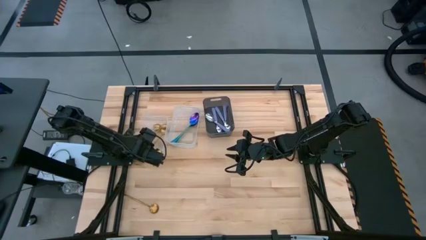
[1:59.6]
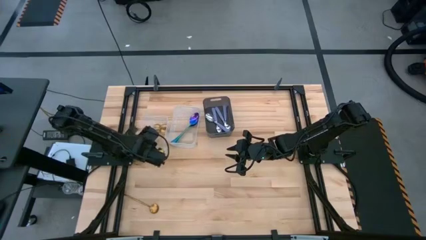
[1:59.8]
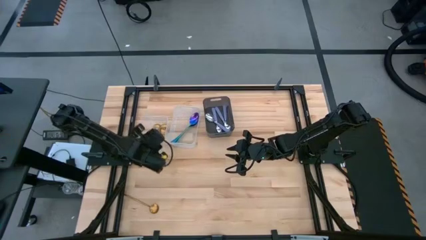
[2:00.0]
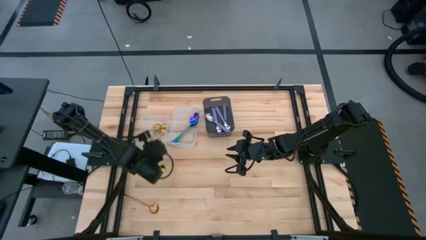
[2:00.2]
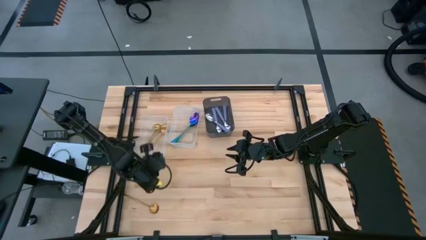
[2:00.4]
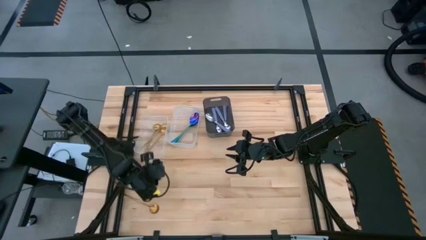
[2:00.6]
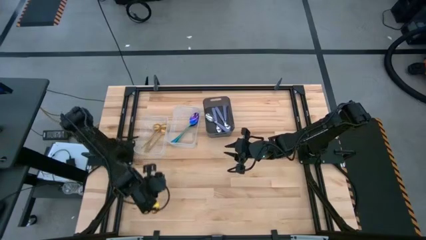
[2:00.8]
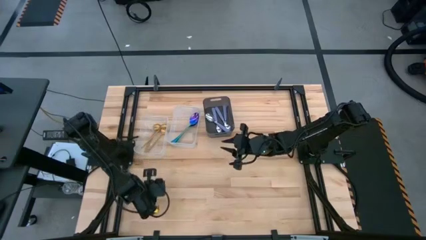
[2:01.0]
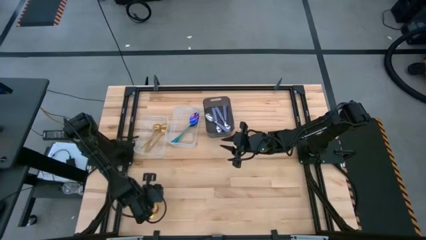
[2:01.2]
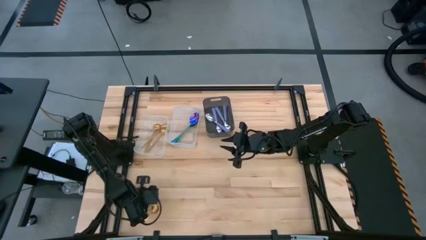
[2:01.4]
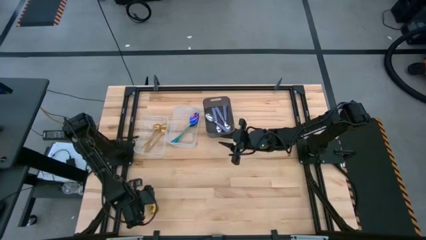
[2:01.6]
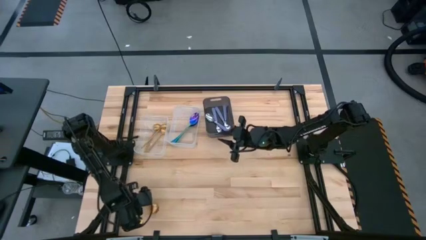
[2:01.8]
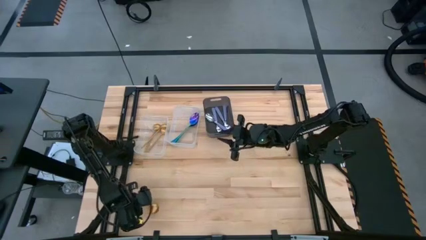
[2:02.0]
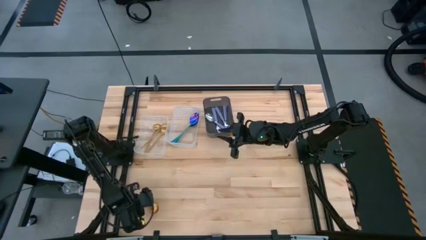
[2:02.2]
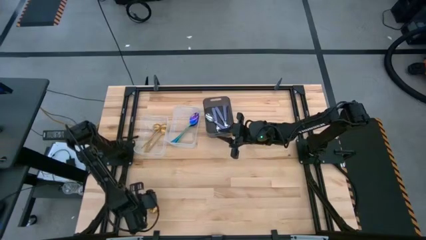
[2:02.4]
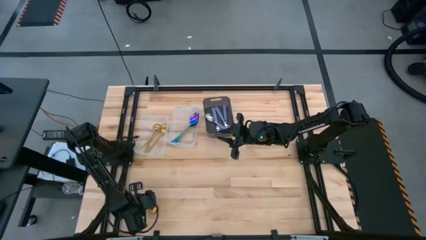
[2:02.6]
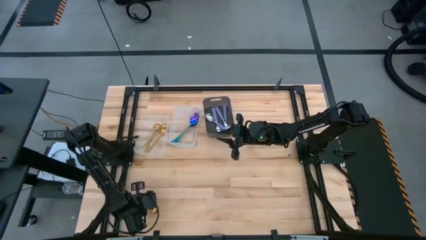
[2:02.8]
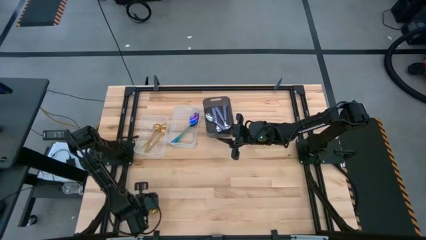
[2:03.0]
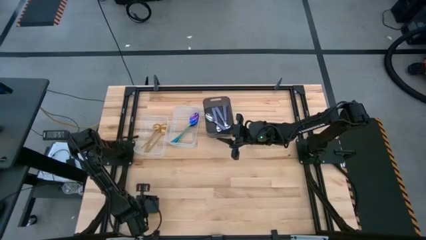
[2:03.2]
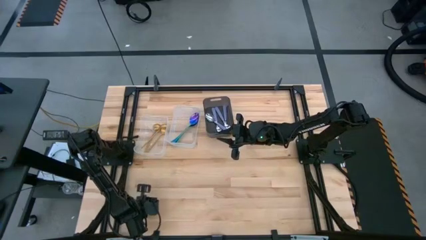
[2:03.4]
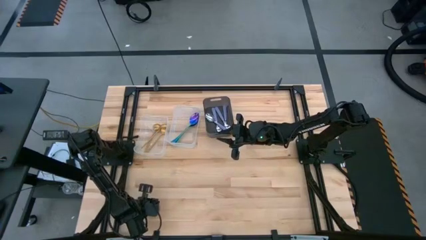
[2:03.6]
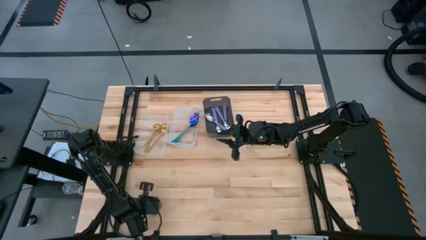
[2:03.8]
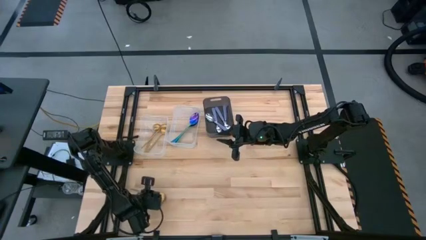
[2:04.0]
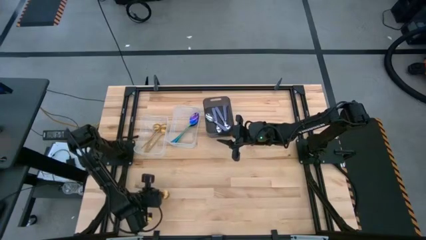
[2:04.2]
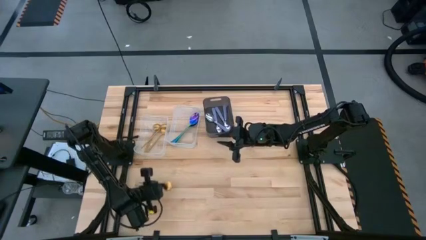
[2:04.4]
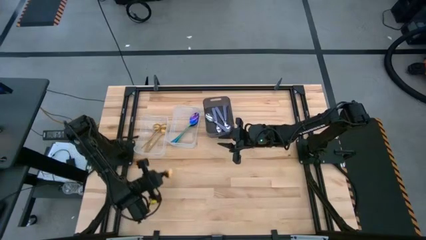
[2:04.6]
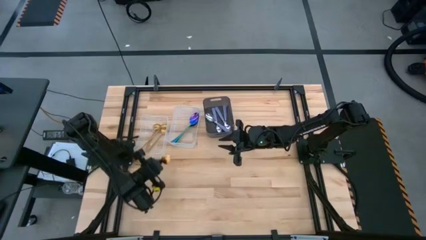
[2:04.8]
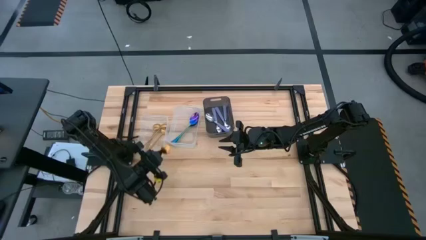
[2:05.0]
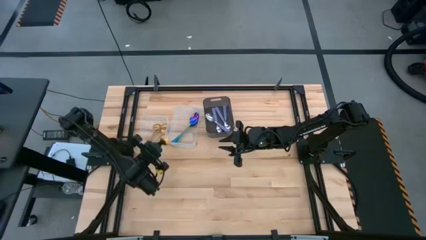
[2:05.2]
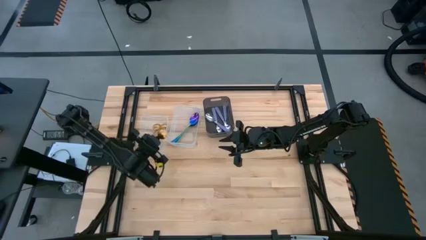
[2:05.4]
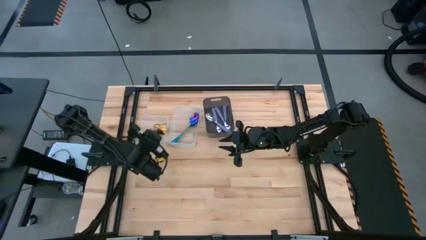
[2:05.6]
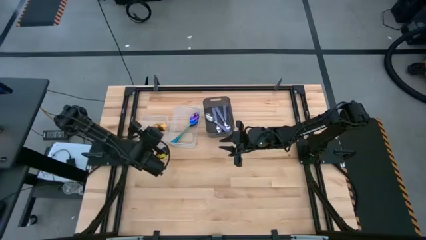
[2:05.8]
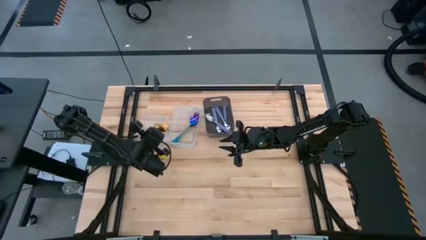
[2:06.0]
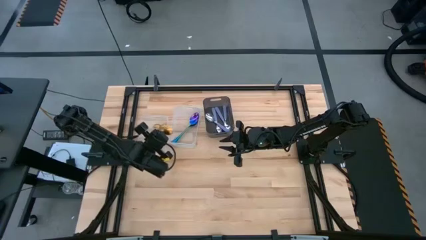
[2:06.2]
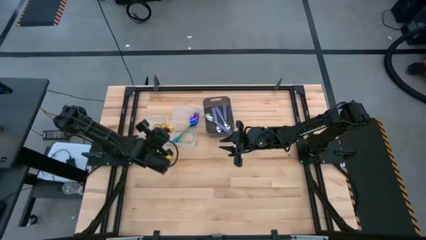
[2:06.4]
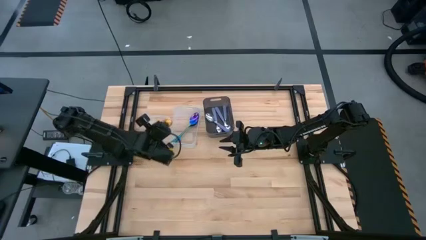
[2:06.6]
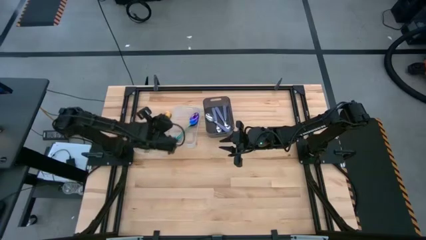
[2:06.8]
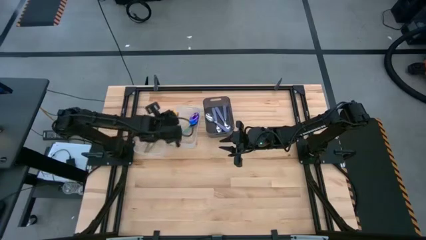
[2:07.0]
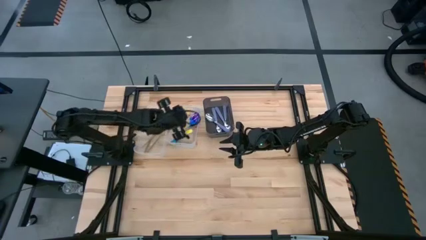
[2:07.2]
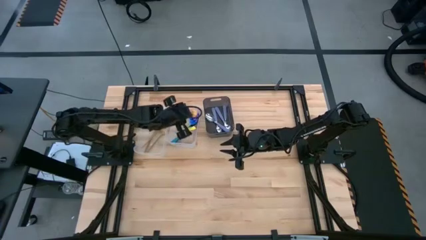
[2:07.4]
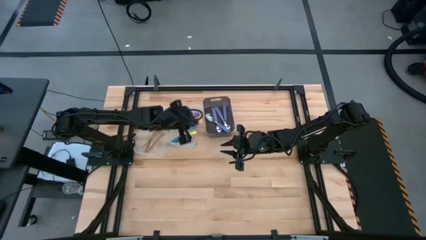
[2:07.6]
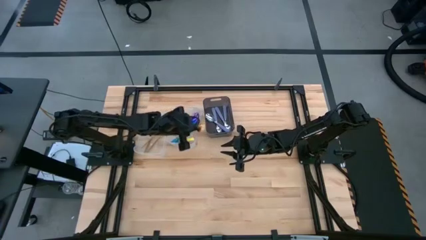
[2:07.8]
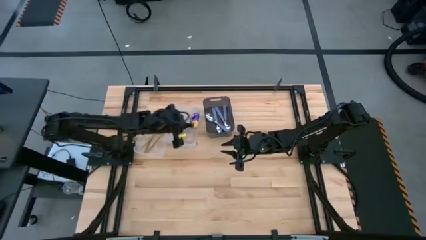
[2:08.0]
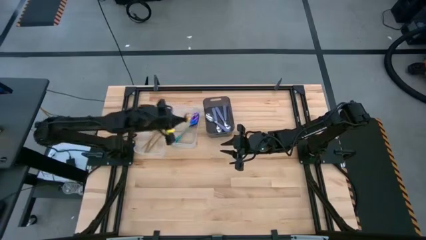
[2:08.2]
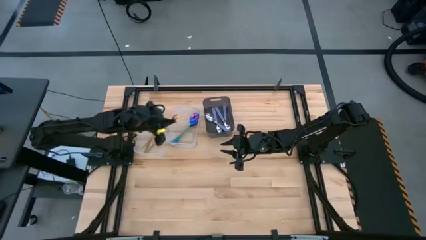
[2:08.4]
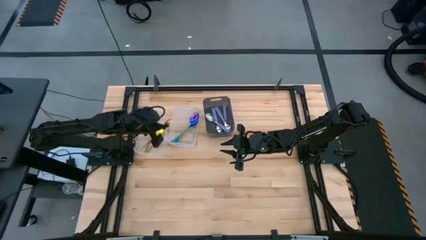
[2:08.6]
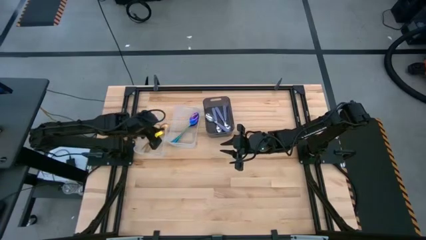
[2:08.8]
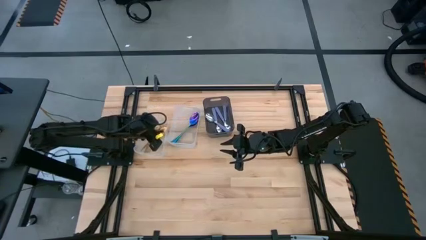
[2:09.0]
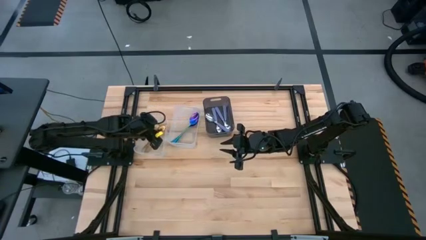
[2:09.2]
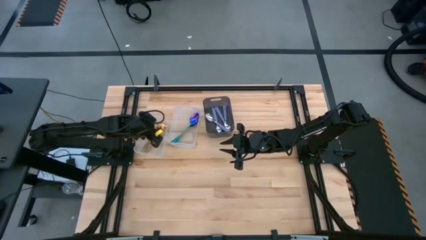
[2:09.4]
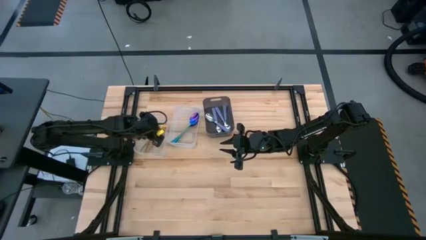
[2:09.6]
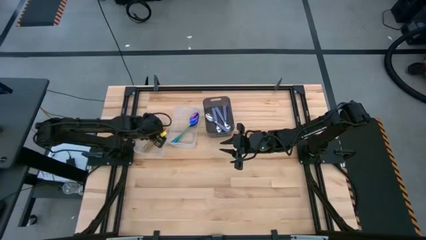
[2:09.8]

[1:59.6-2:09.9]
Task: Sort silverware by color (type)
Put the gold spoon into the left transparent bin

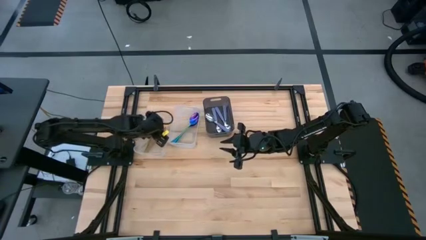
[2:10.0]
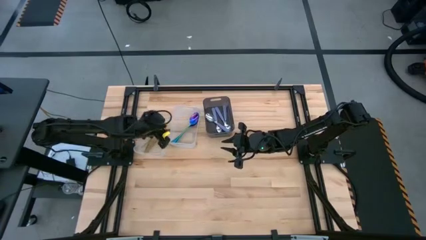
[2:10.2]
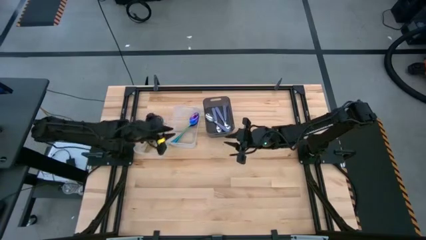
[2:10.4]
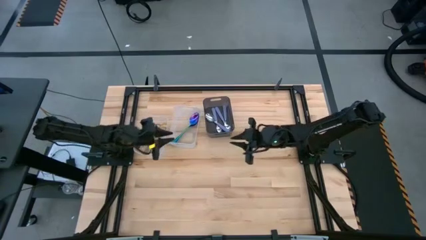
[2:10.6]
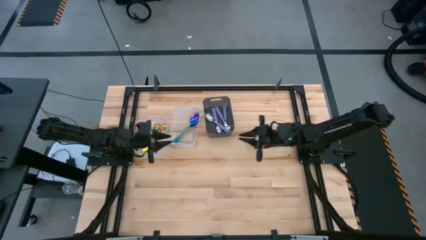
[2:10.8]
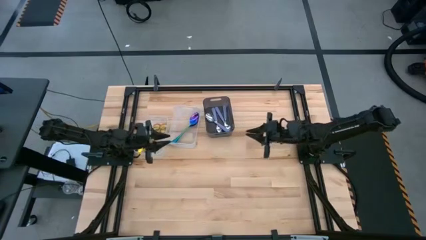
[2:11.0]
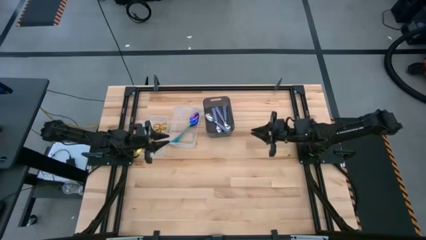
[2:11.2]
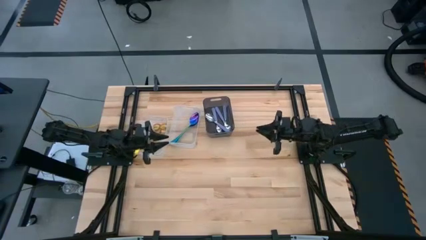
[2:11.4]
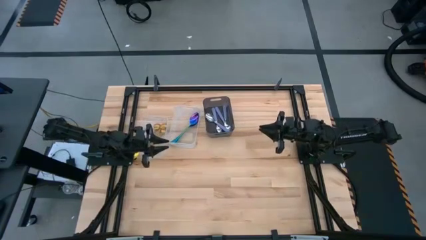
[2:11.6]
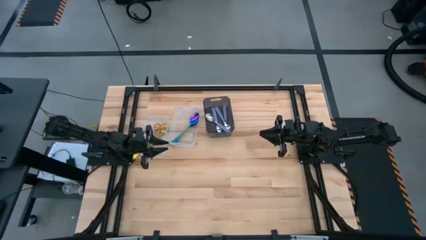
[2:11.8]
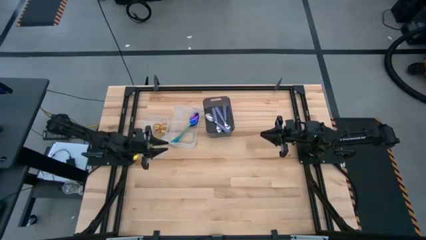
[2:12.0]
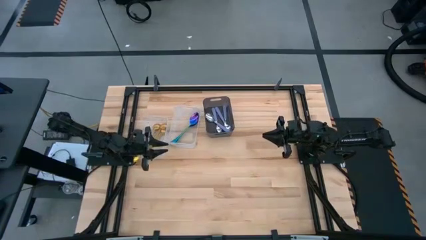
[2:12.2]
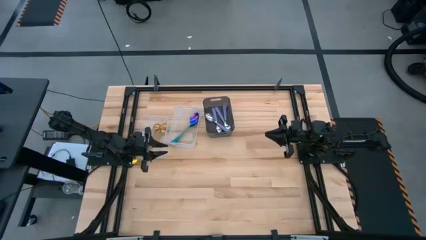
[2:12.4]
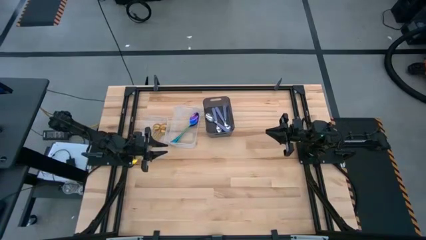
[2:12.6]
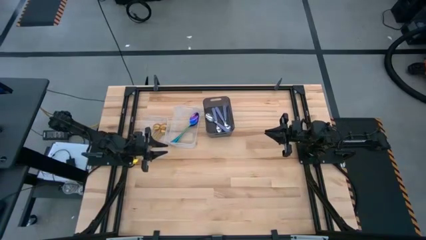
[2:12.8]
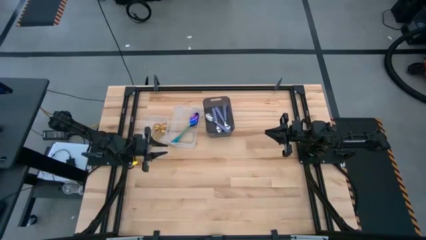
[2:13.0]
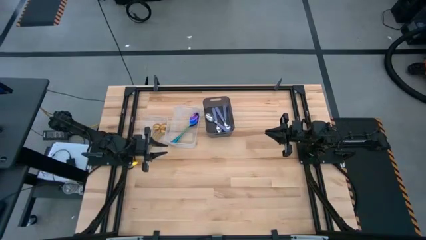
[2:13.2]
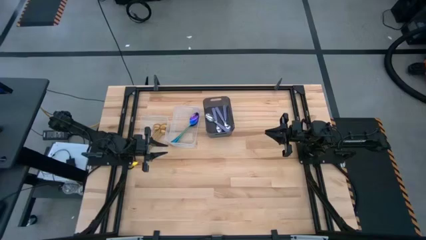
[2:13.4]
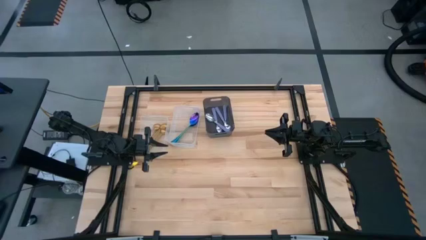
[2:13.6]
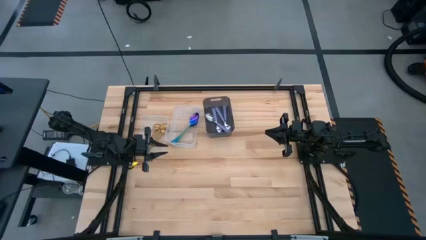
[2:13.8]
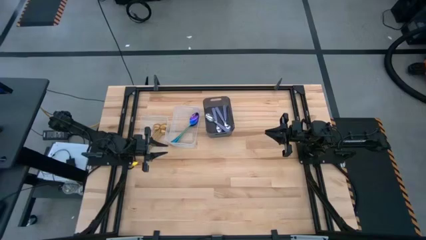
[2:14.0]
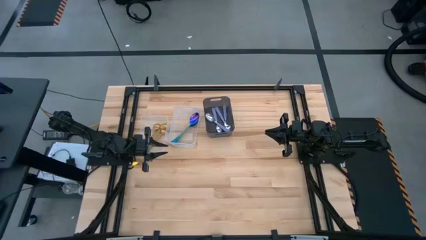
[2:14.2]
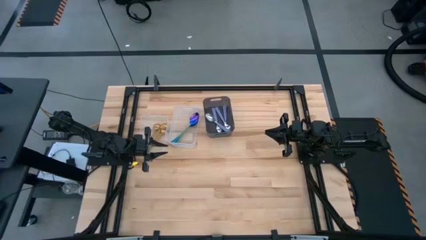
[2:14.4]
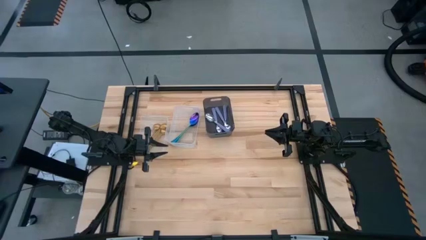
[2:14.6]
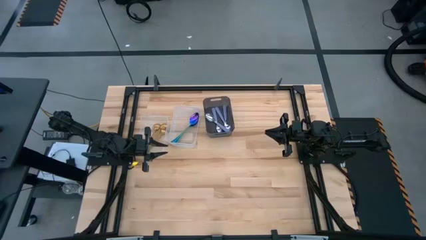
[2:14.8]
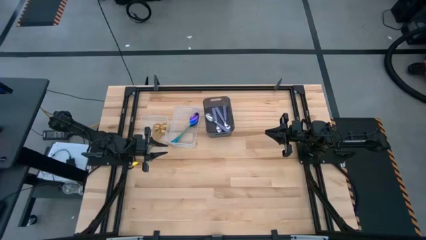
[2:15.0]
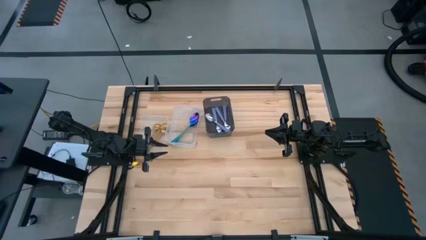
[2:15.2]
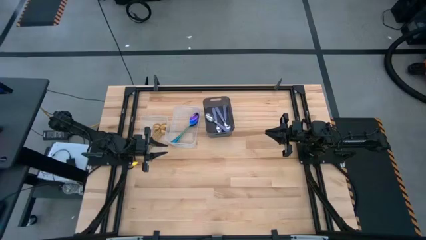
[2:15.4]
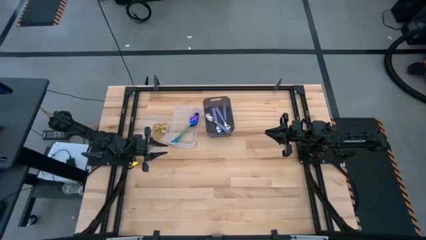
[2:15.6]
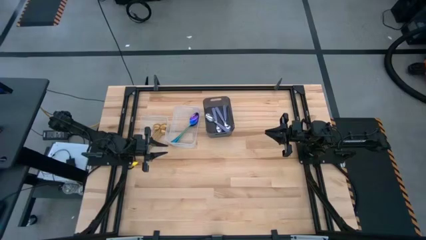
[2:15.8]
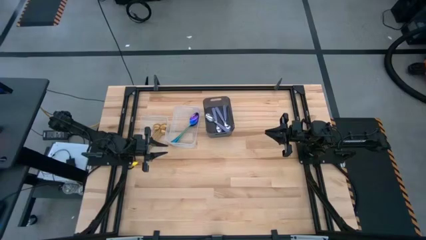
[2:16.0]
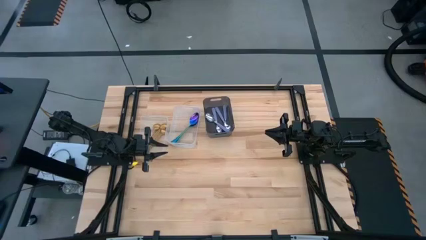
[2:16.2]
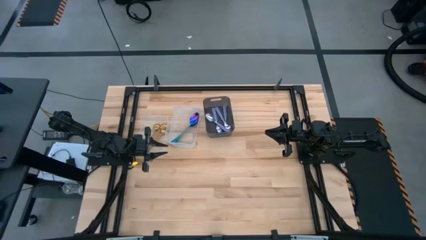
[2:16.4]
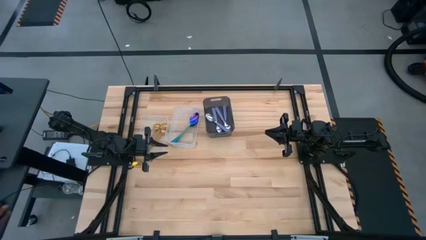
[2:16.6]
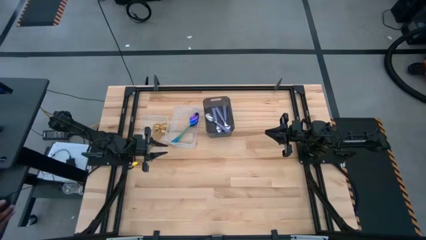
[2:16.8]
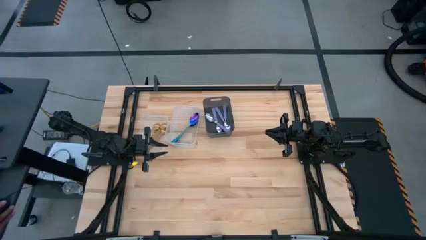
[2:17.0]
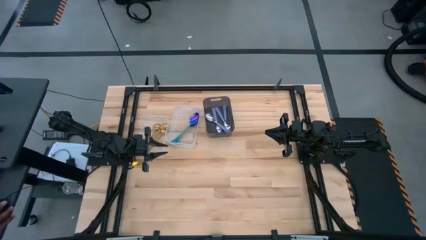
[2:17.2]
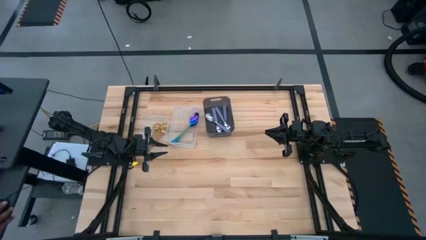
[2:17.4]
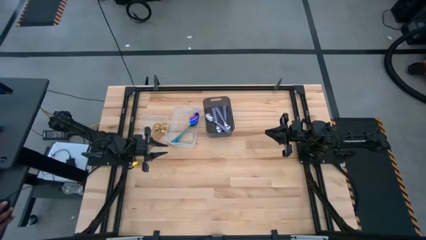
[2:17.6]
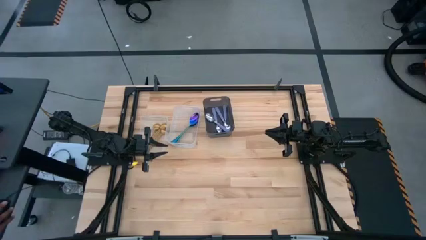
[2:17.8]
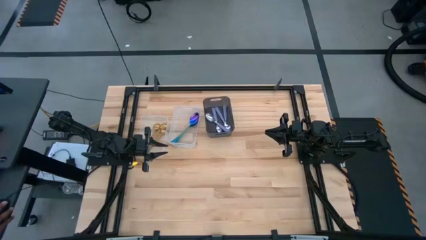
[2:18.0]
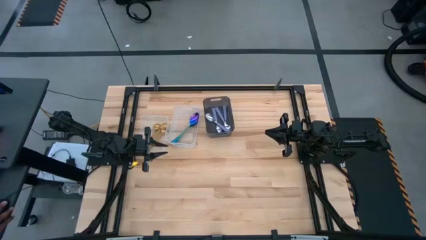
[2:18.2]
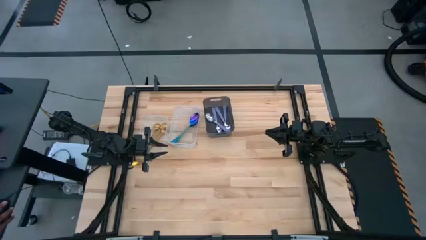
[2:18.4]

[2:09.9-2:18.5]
Return to Home Position
